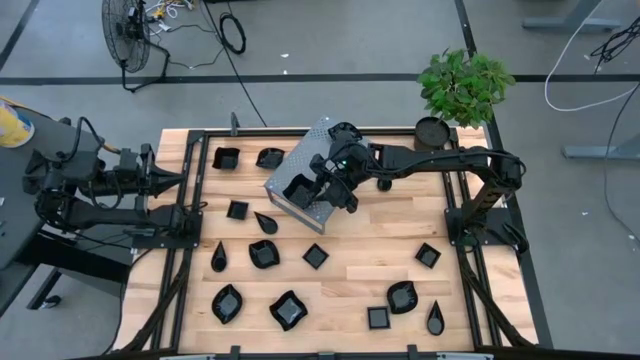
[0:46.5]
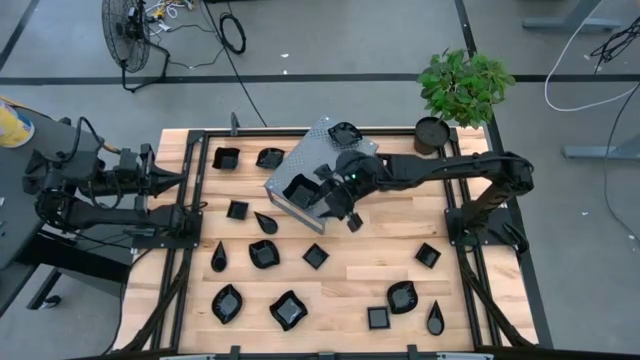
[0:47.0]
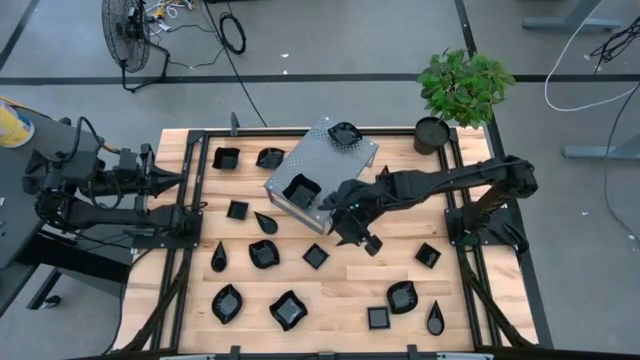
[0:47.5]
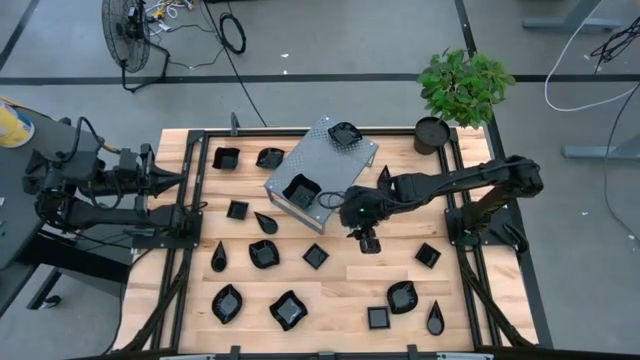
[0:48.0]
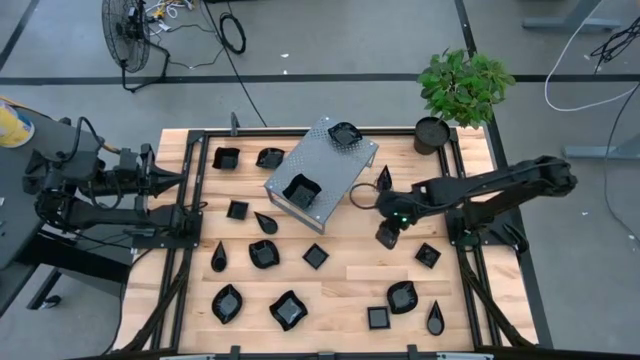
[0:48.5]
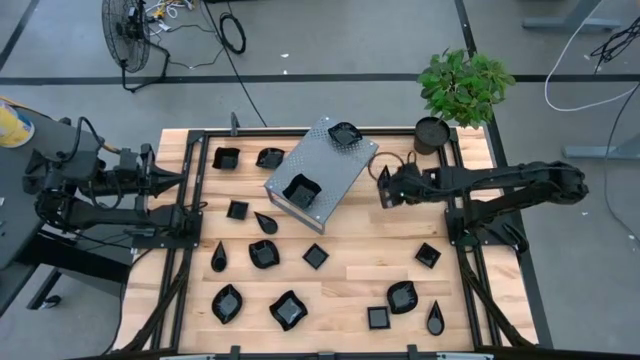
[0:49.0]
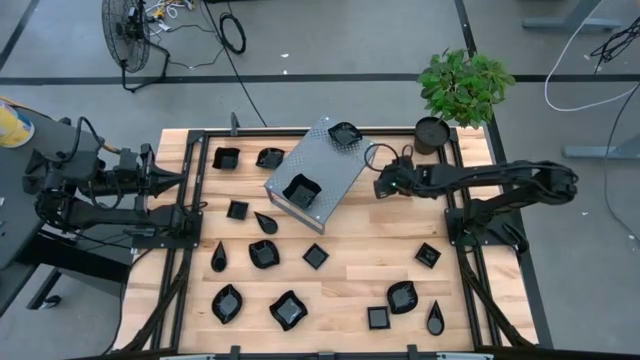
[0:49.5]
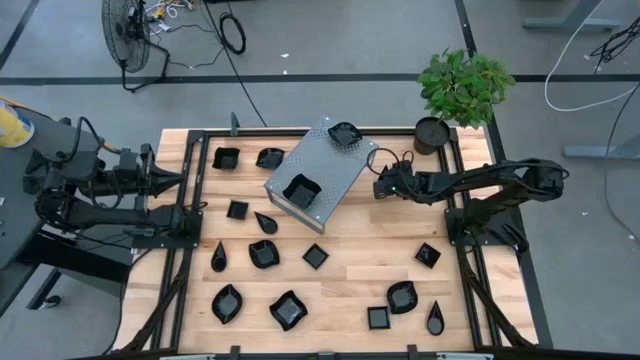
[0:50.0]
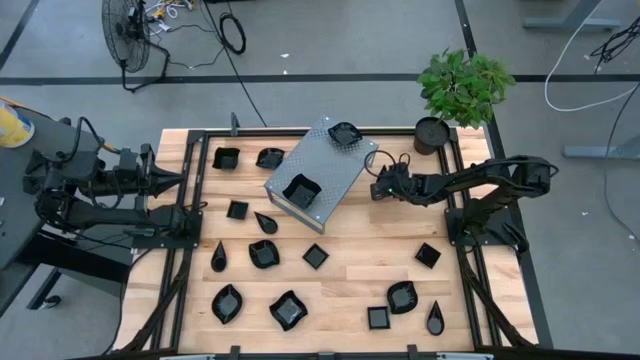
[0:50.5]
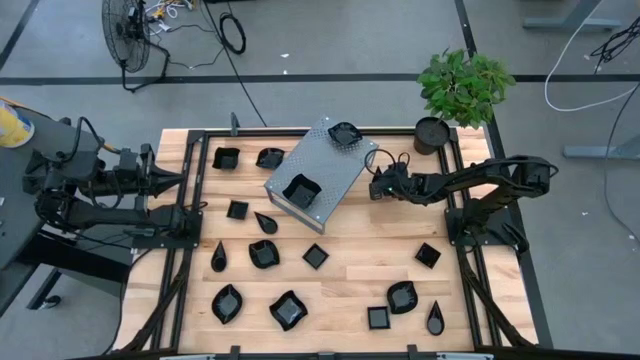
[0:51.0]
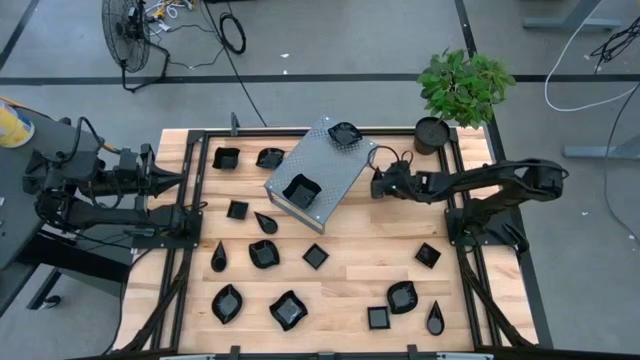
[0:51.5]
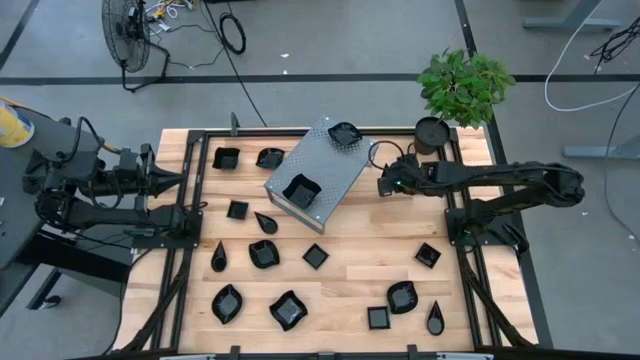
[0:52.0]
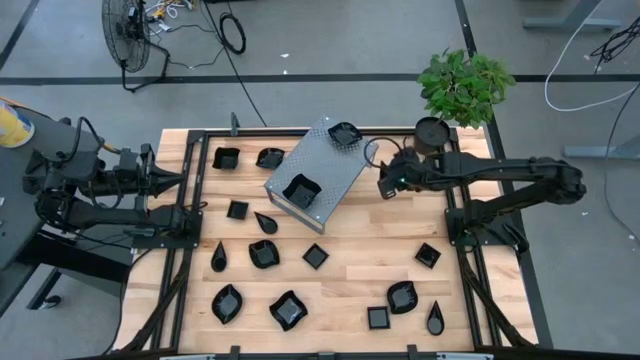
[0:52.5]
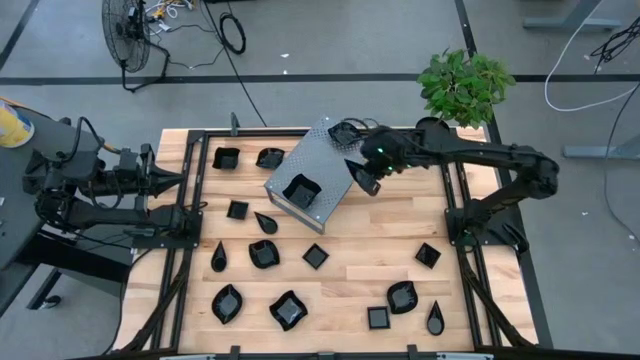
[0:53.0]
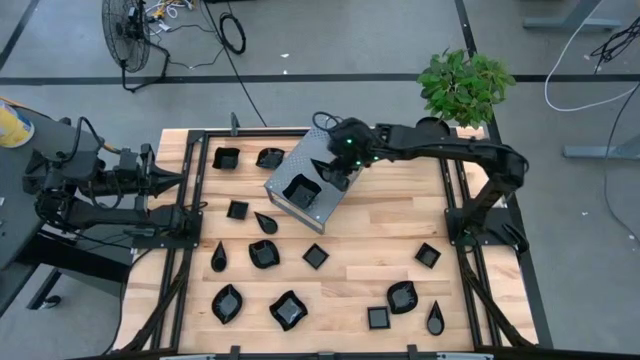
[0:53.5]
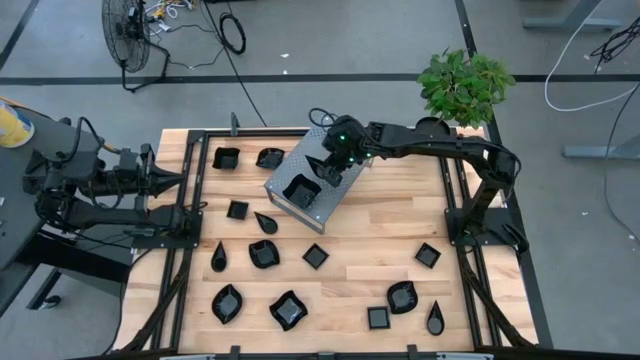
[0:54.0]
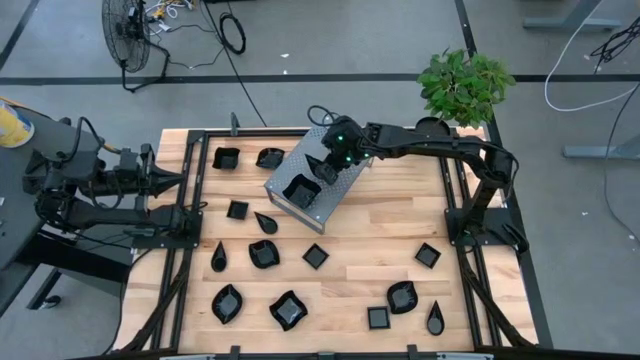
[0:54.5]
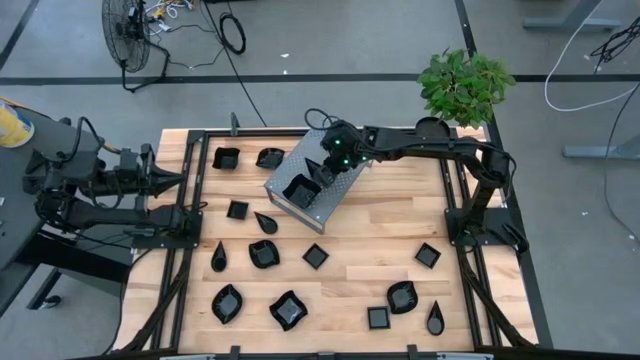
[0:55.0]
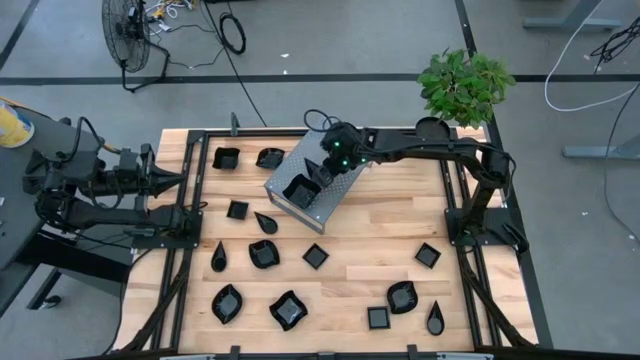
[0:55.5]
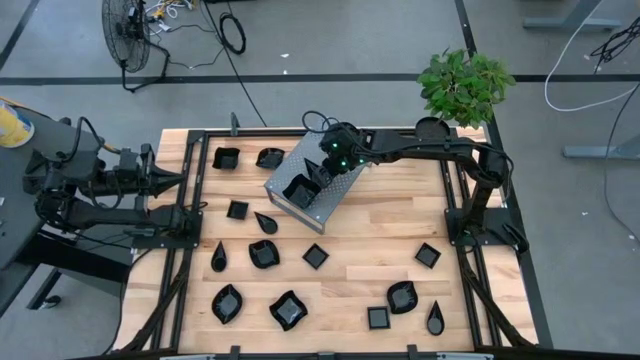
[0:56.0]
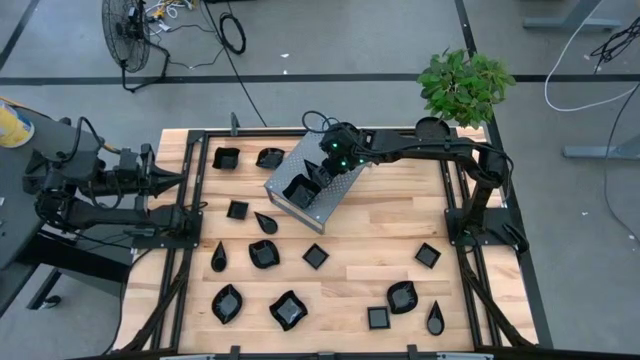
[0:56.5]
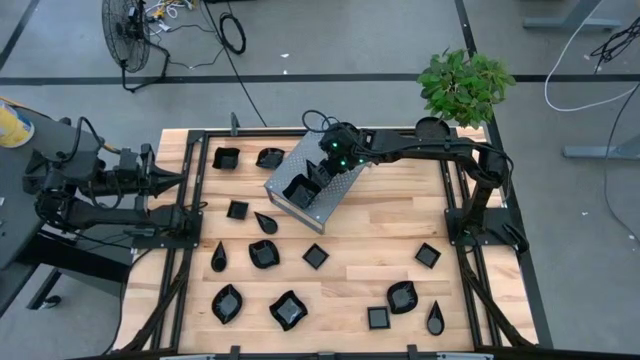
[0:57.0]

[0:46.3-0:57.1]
Task: Pick & Place Mini shaped plates
Put the black drop shaped plate on the shelf

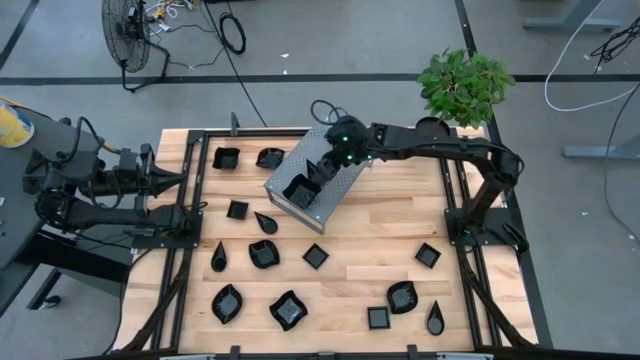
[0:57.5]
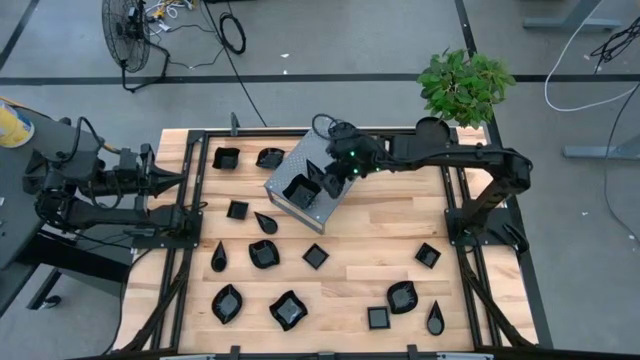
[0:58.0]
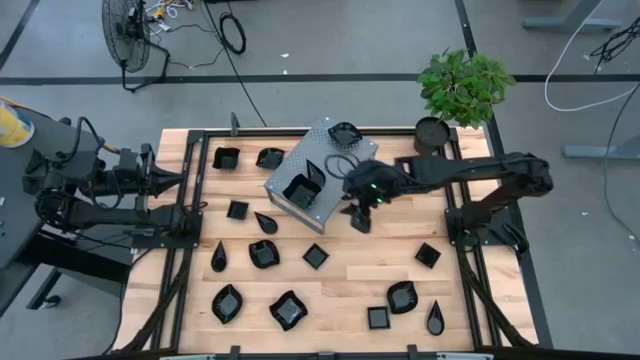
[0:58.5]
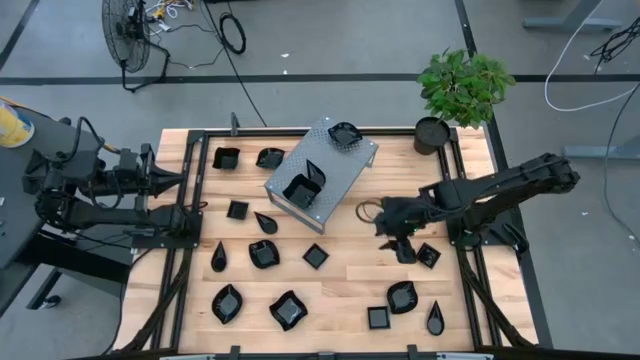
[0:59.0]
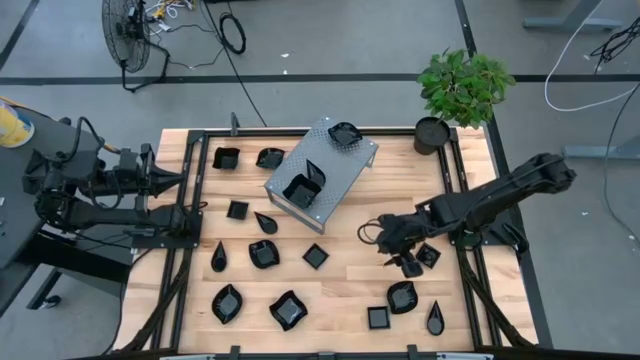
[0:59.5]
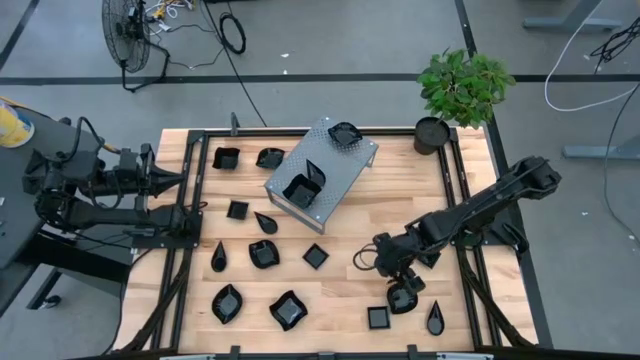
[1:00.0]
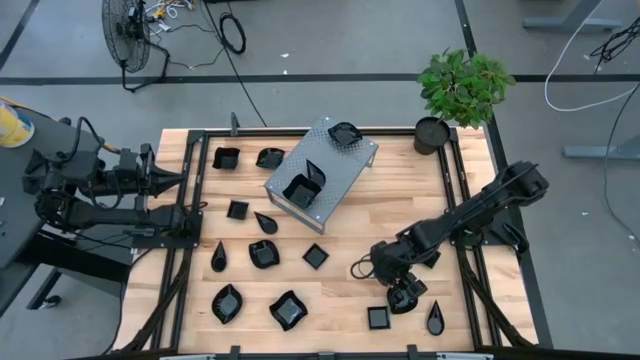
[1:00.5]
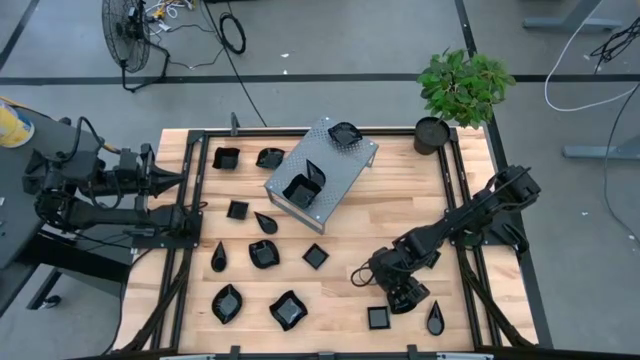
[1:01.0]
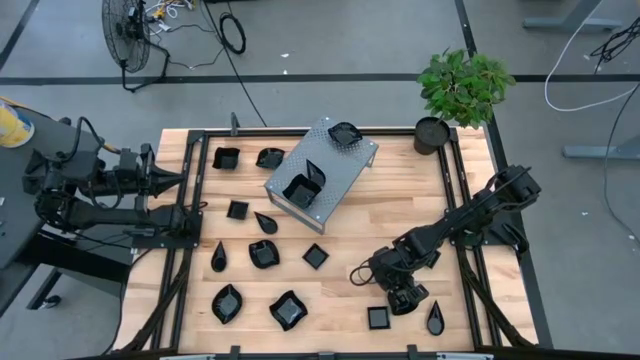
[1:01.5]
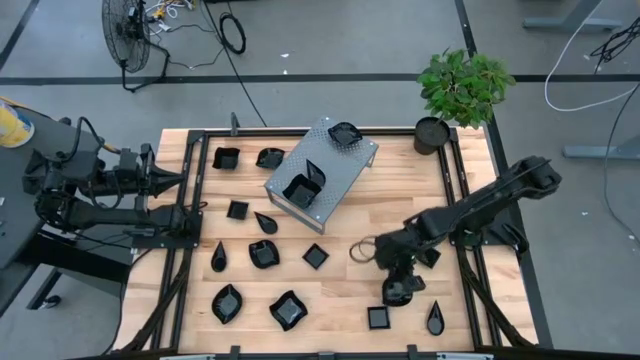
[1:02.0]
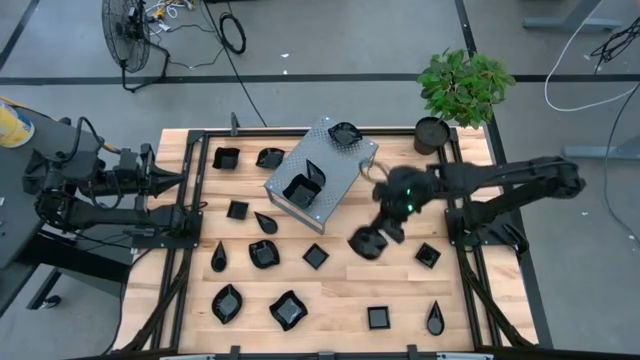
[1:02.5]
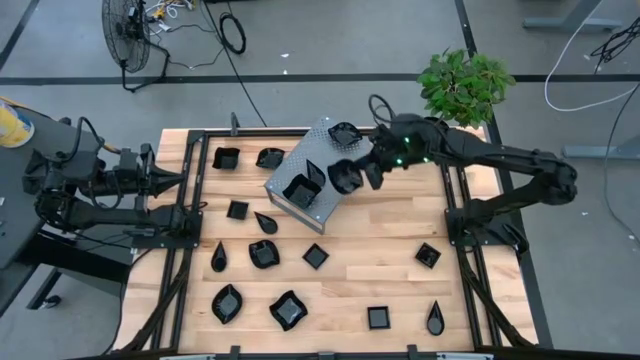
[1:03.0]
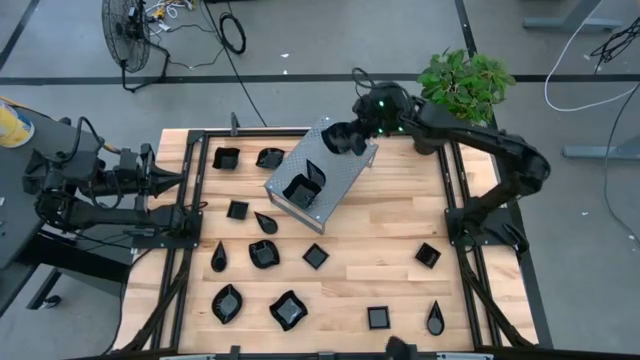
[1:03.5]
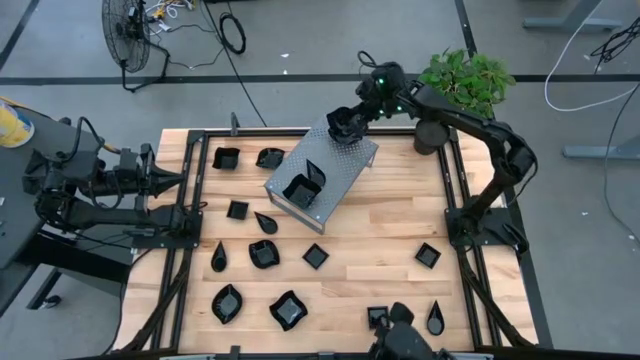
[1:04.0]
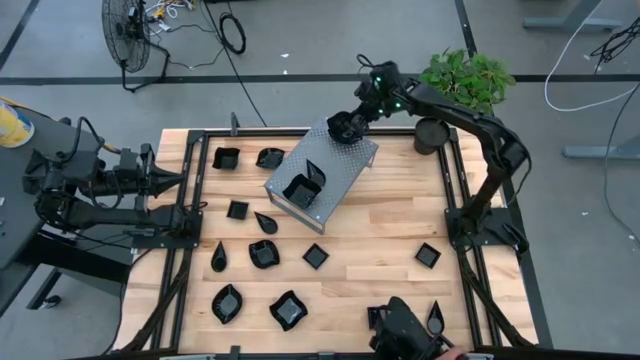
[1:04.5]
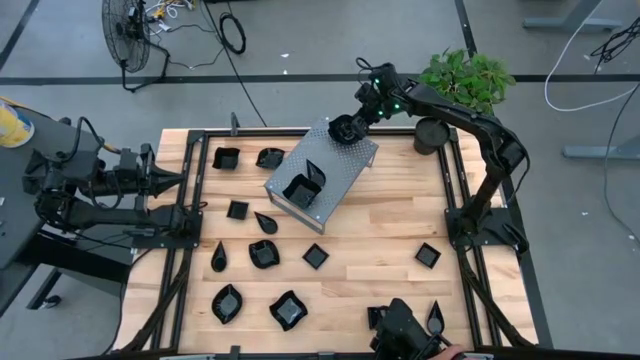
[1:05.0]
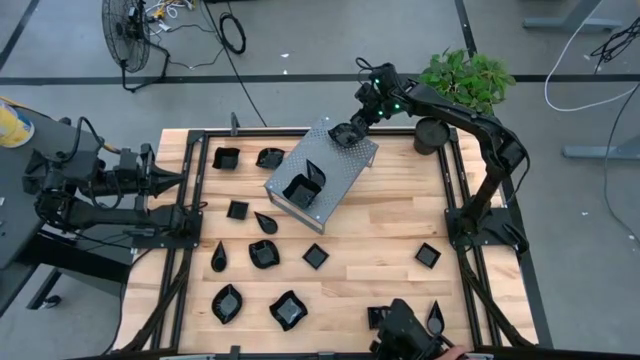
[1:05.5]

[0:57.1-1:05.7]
Stack the black leaf shaped plate on top of the black leaf shaped plate on the shelf

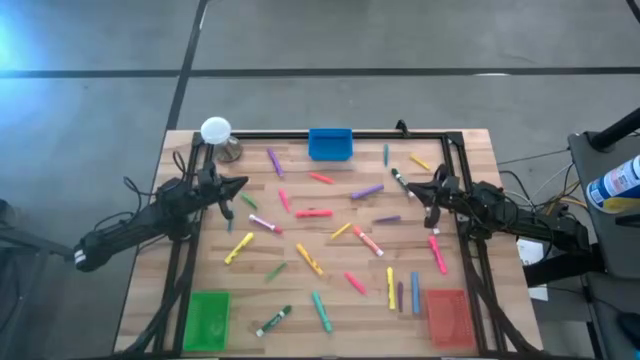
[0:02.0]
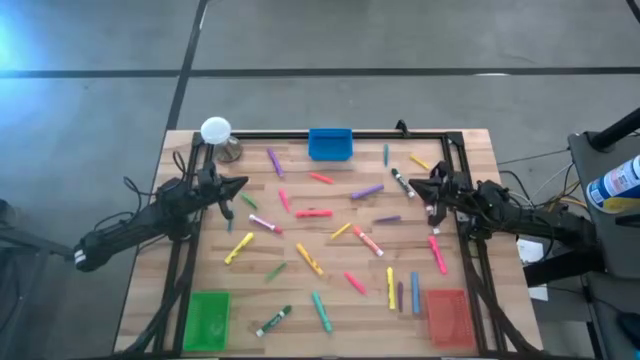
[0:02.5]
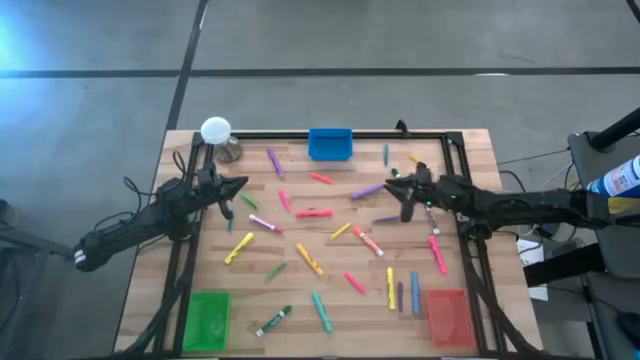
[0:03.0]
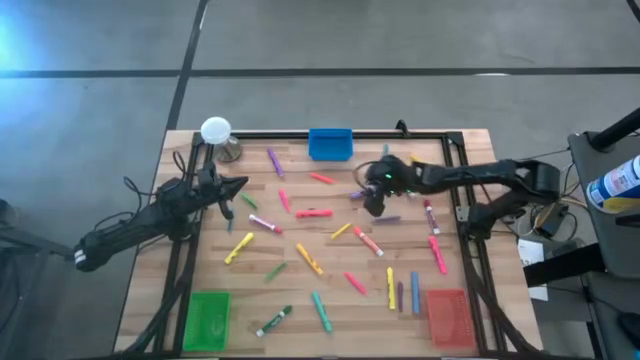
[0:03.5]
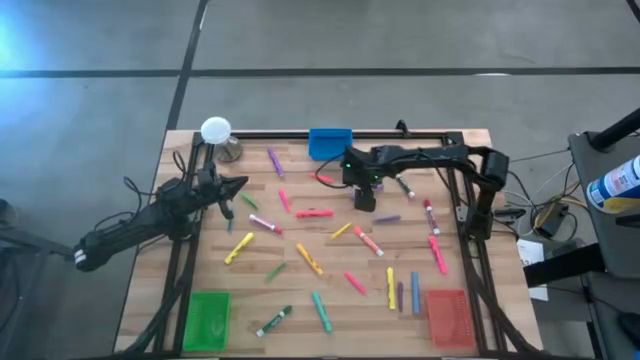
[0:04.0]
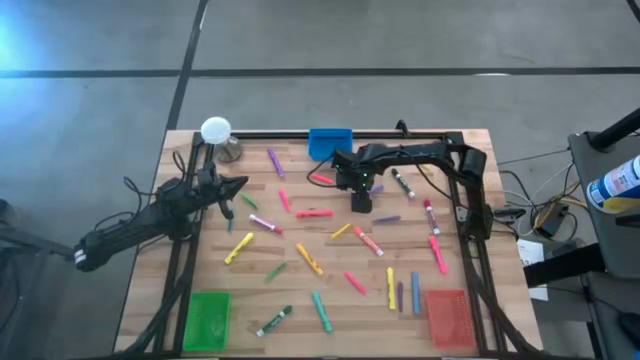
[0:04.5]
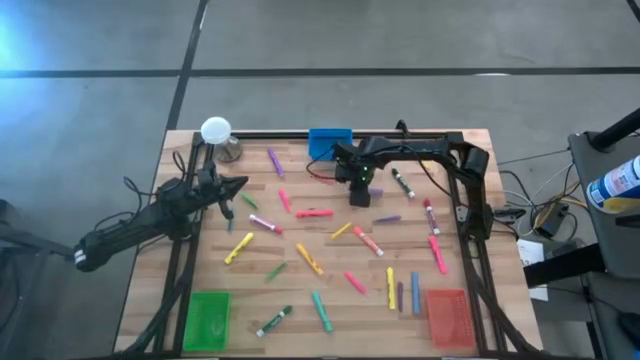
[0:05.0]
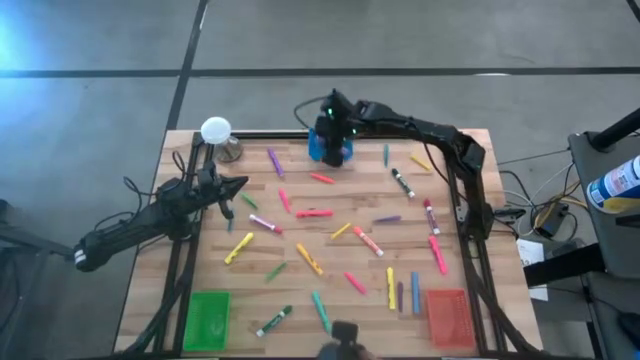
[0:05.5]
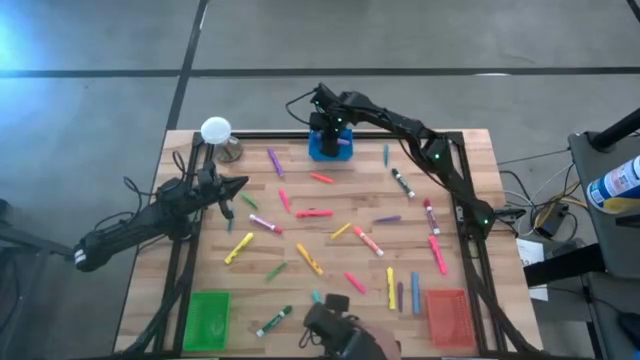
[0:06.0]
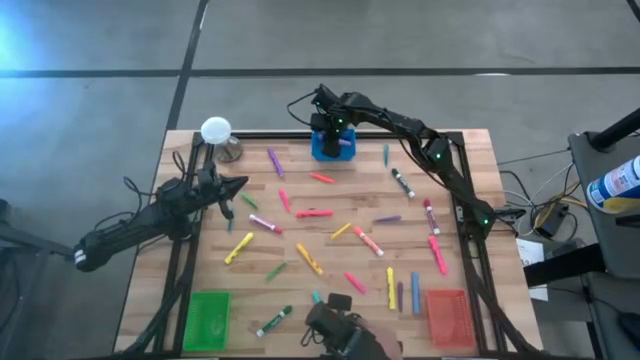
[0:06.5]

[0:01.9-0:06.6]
Task: Pick & Place Markers
Put the right violet highlighter into the blue bin
